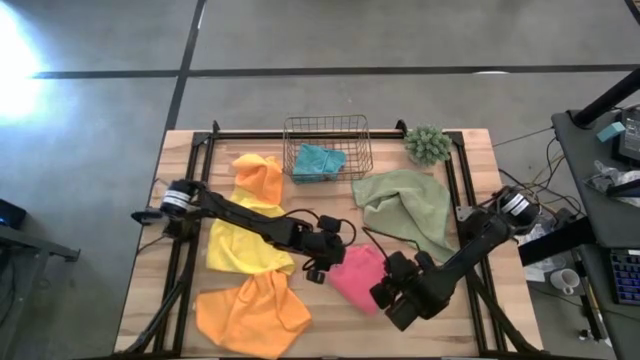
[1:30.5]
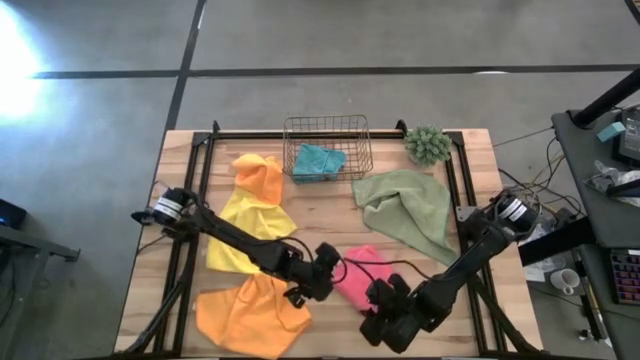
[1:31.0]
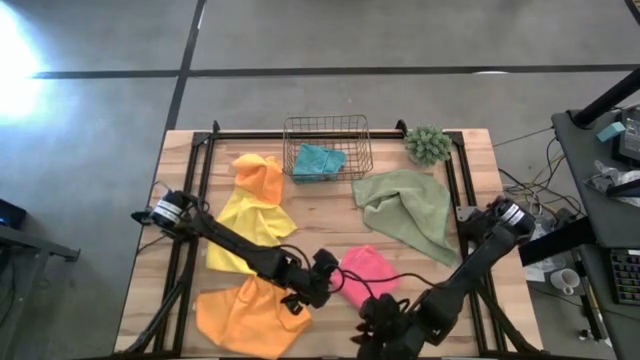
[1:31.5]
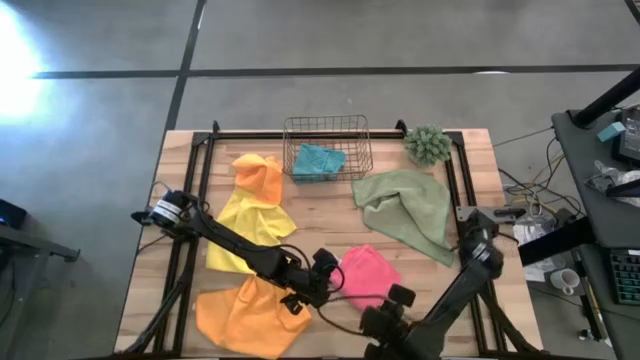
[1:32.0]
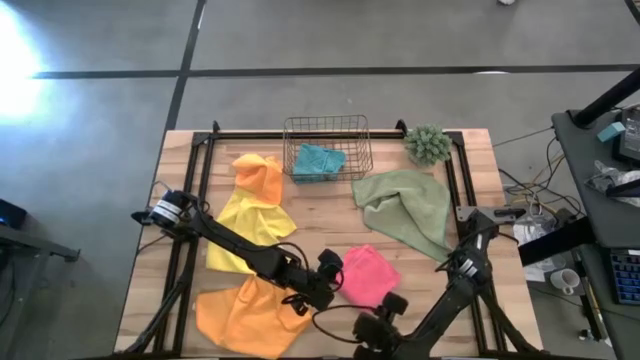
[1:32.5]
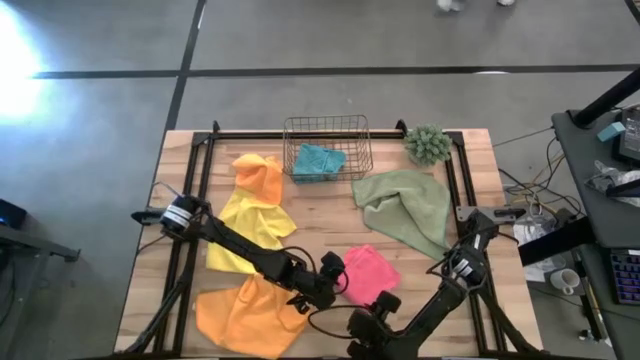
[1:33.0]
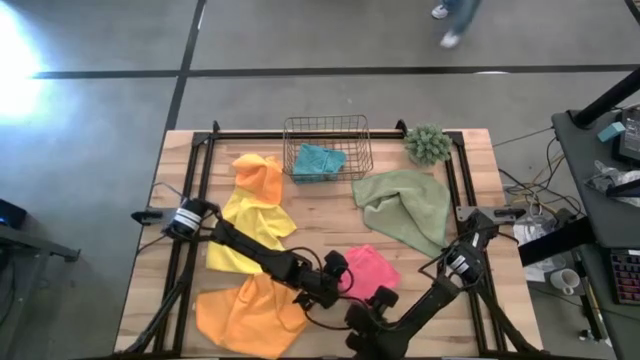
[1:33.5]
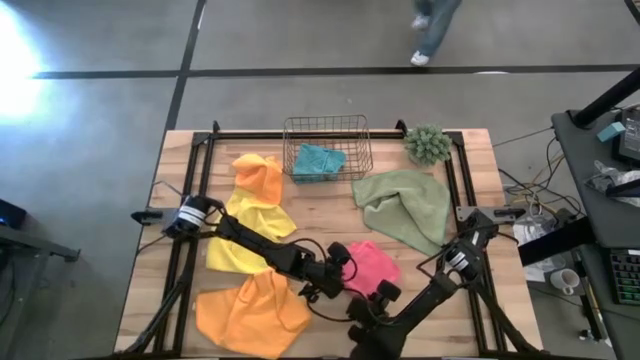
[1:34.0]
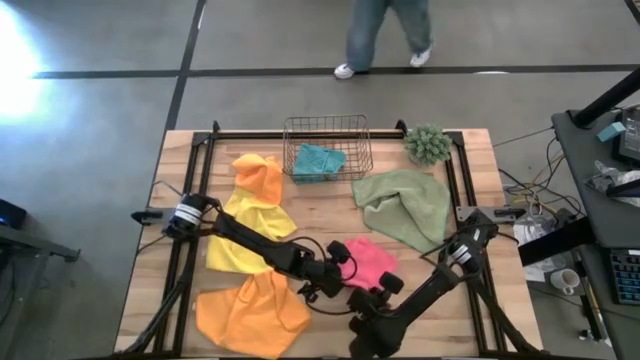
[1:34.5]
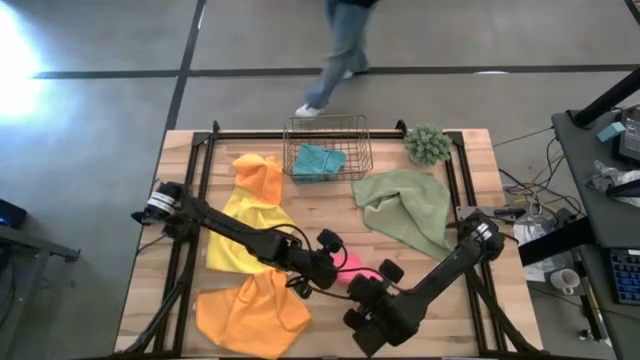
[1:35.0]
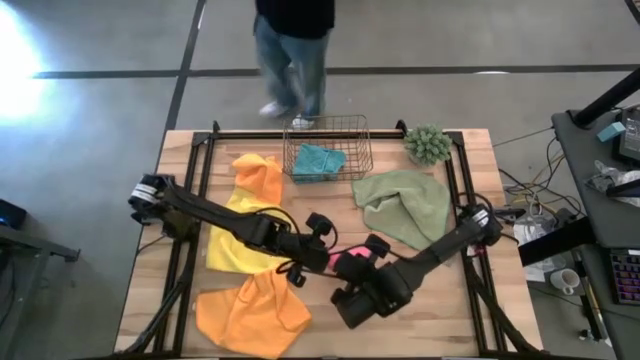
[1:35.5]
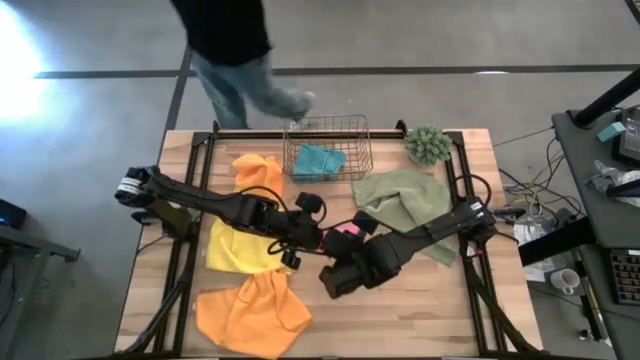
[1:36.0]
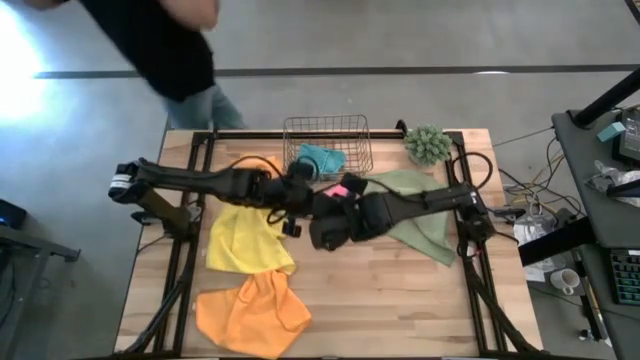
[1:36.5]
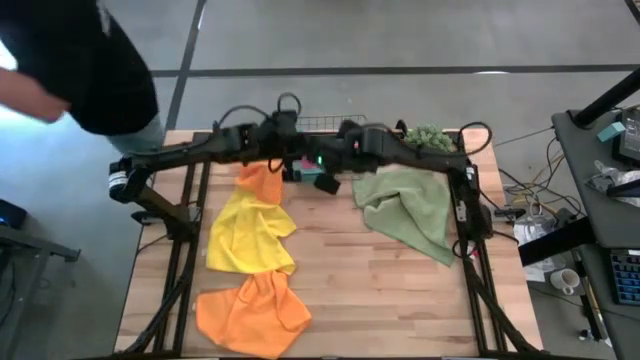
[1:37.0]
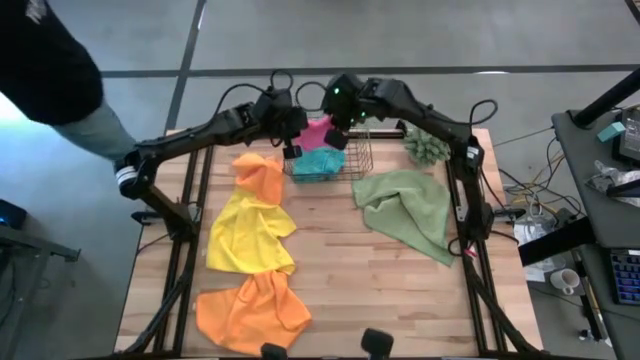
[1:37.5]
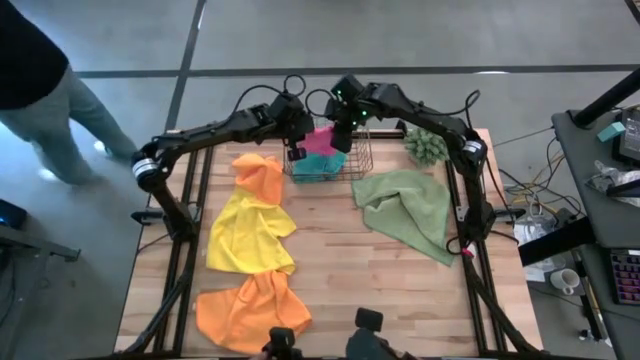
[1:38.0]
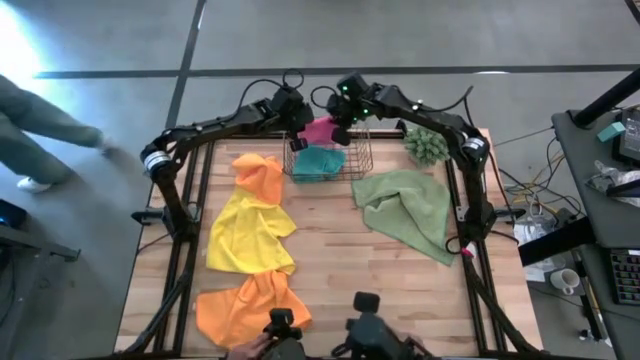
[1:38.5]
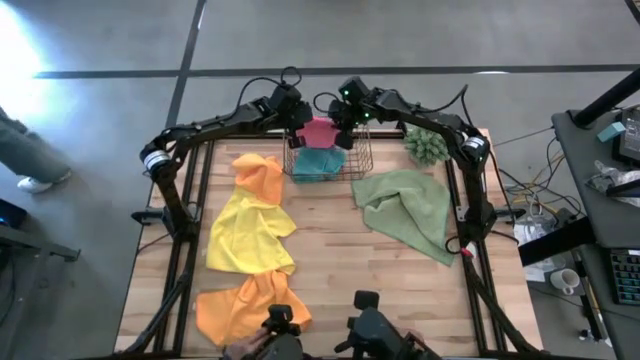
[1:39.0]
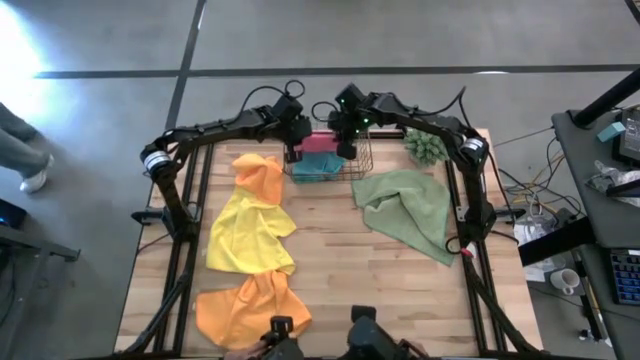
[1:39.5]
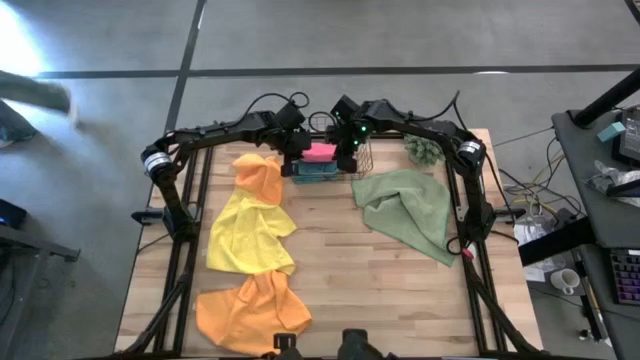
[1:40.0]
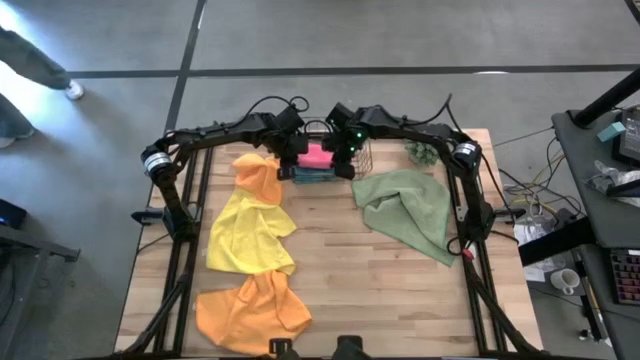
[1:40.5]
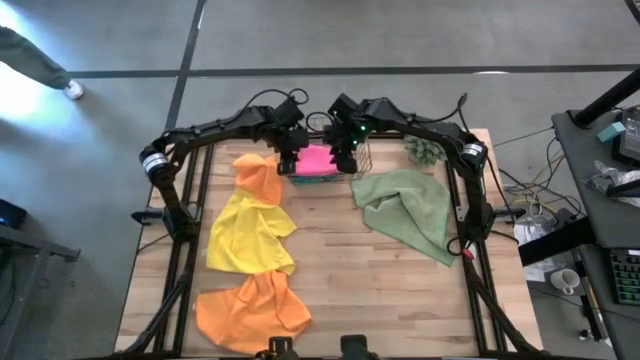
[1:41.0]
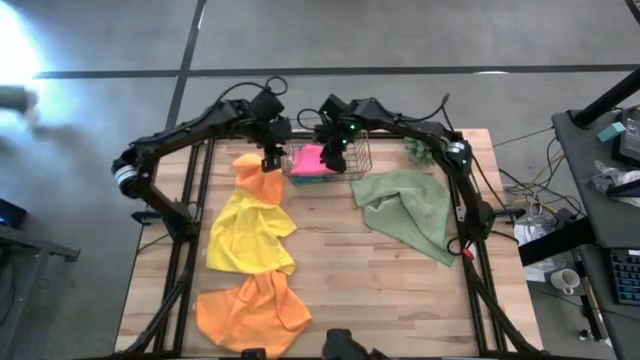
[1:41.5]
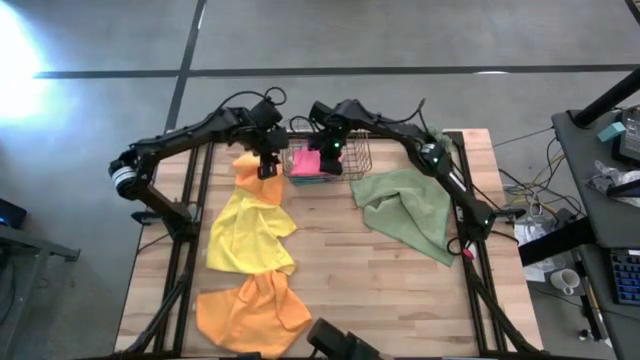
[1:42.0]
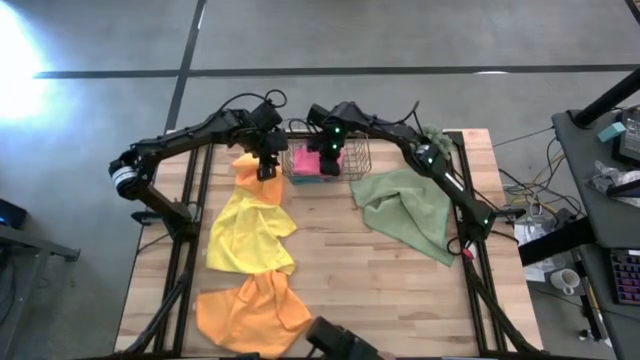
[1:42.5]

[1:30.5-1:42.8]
Task: Fold microfiber towels
Put the pink microfiber cloth into the wire basket

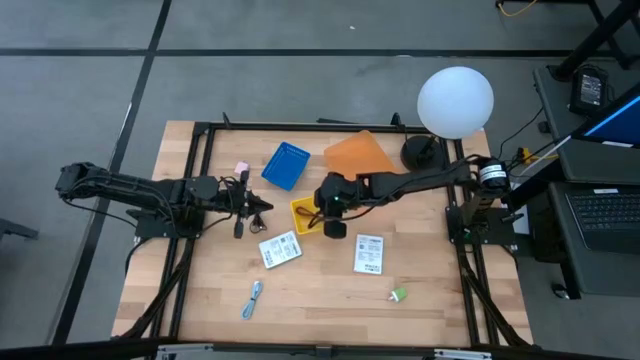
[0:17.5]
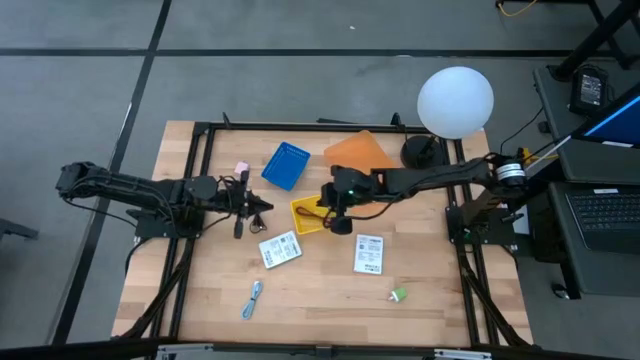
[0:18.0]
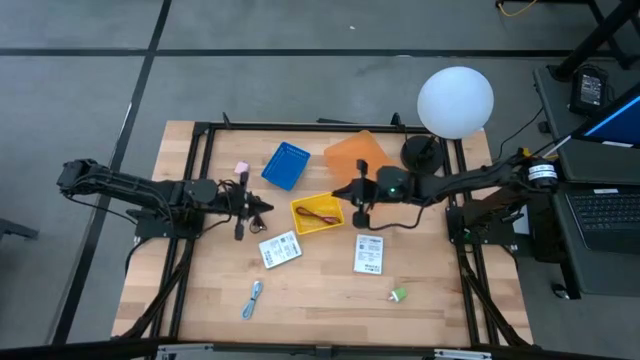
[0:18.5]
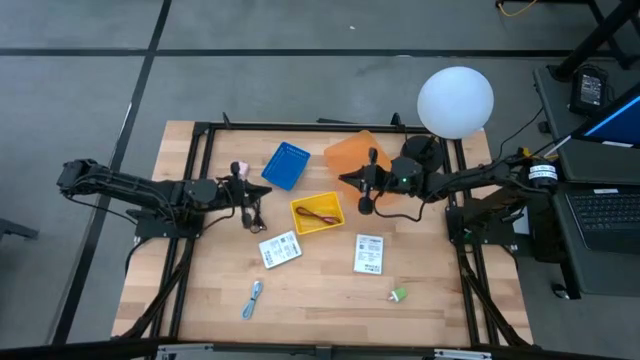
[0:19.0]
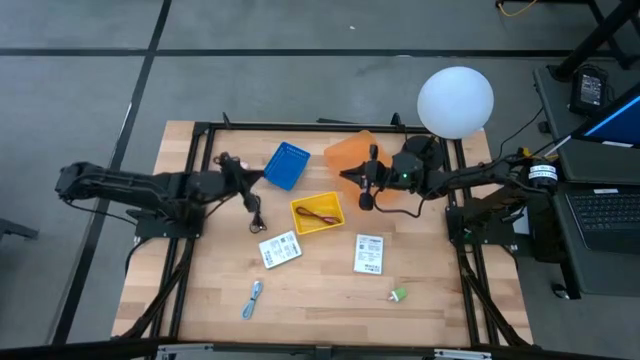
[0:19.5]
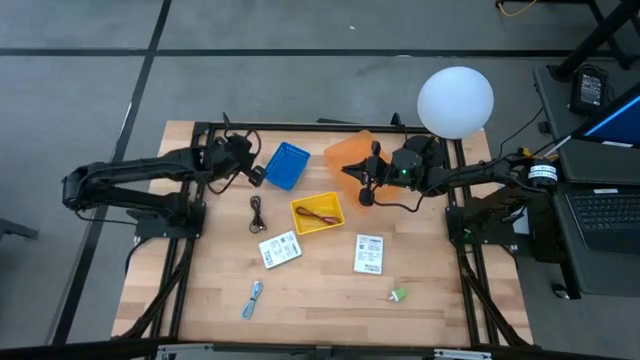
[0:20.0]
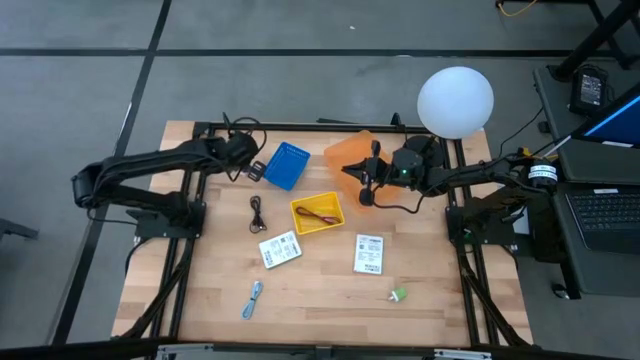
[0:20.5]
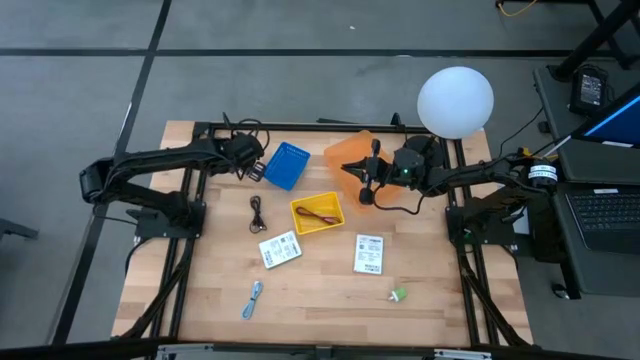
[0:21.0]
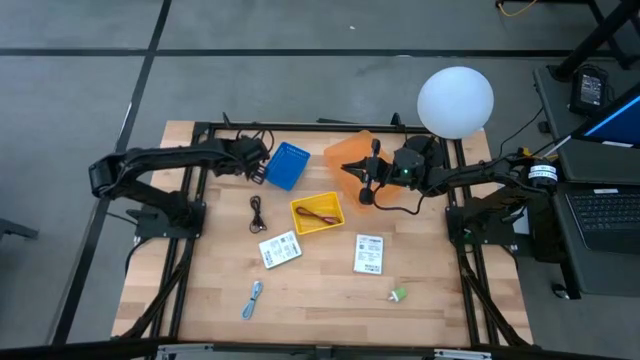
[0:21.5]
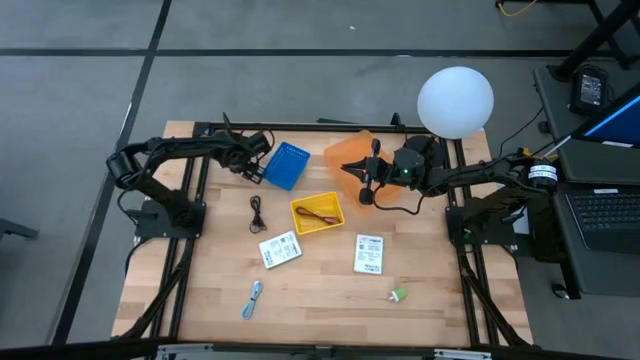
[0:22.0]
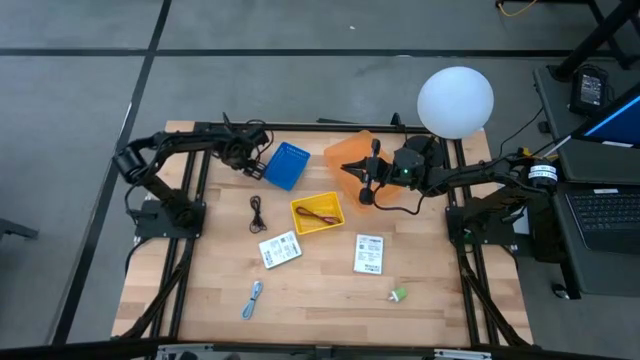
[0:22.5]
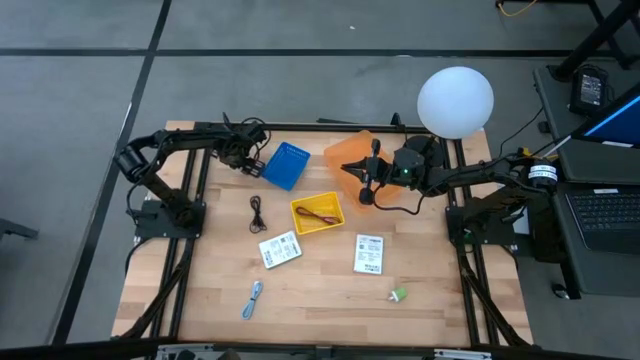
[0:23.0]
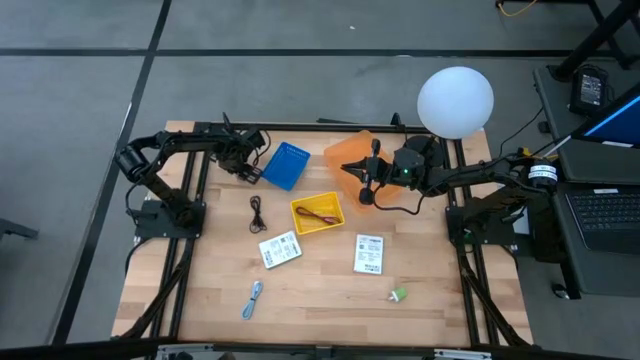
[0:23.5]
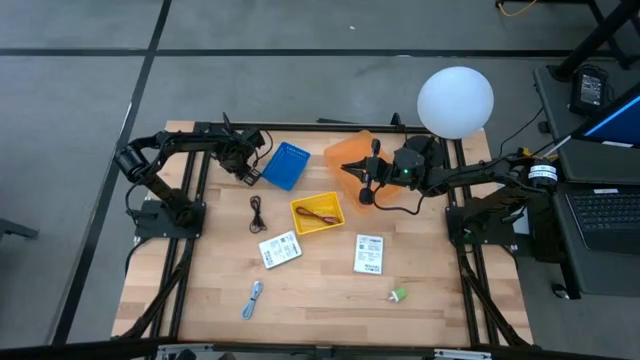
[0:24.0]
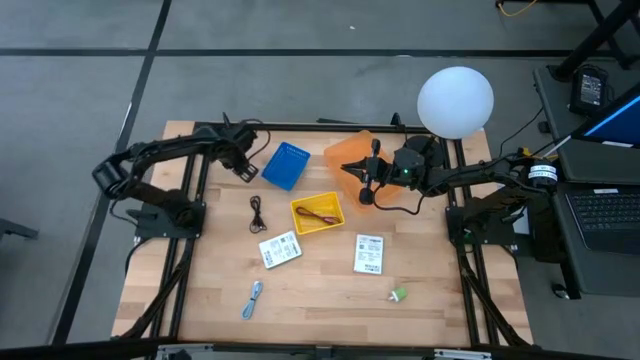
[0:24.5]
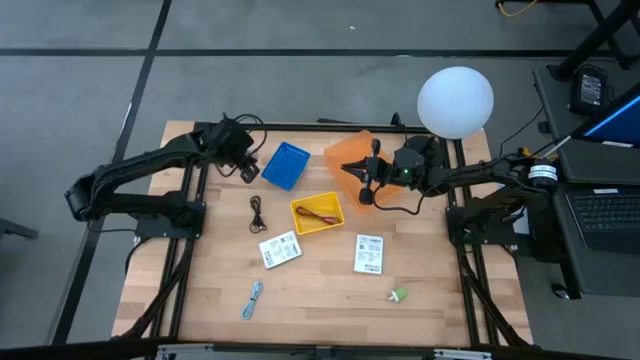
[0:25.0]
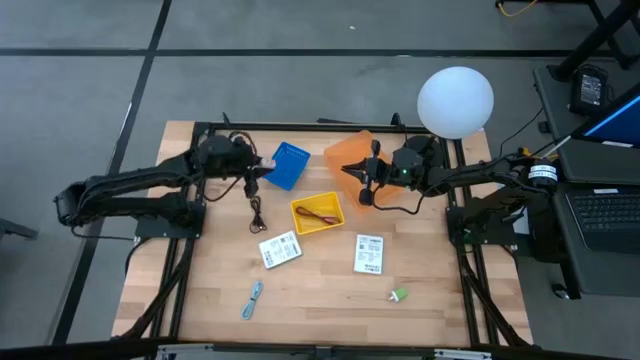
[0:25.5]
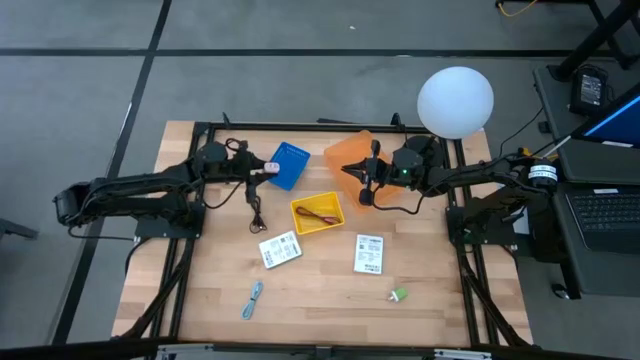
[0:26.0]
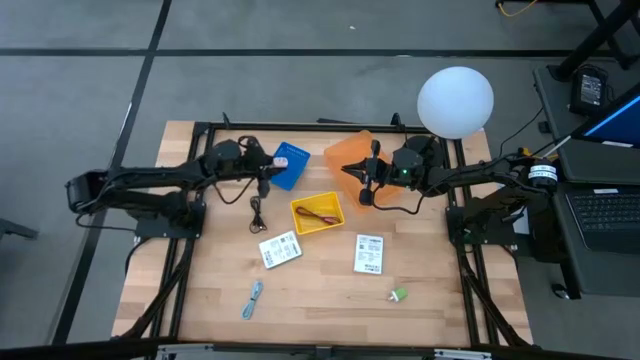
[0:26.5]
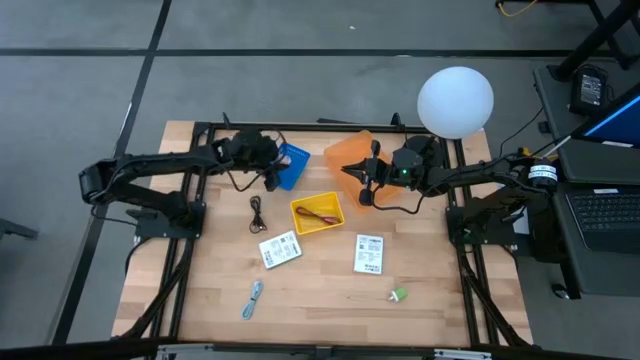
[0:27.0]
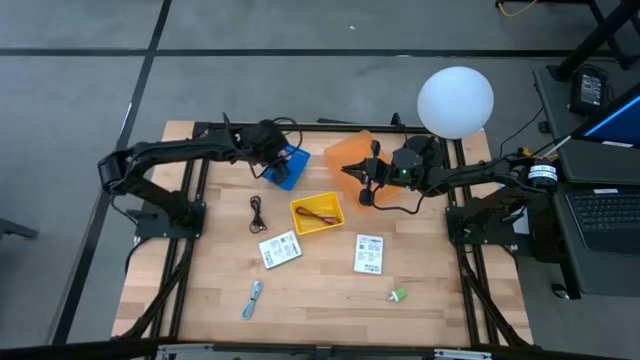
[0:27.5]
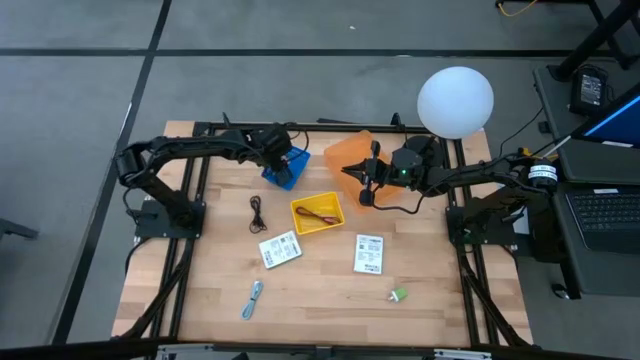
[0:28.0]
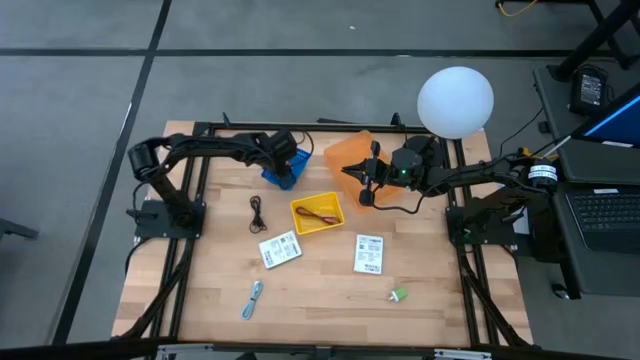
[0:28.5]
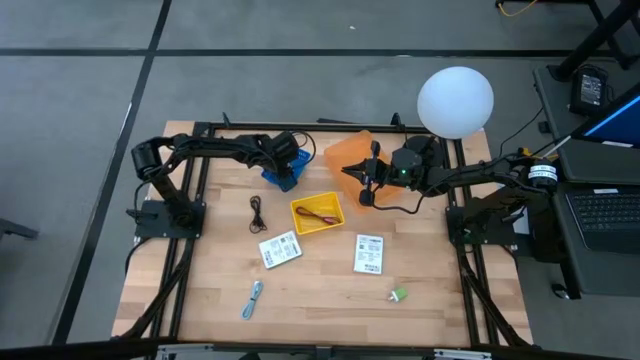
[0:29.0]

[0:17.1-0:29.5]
Task: Pick and place items into bin
Put the white charger adapter into the blue bin
